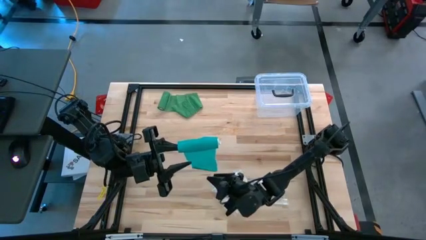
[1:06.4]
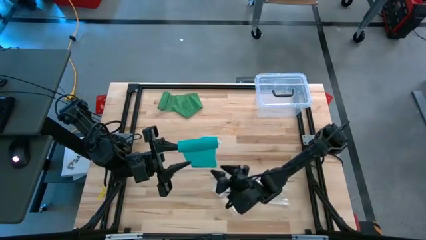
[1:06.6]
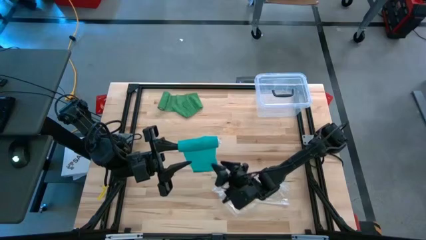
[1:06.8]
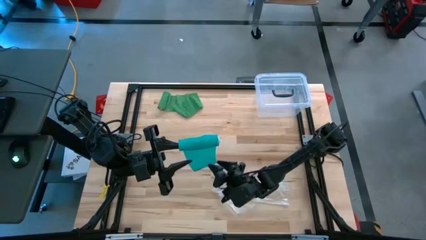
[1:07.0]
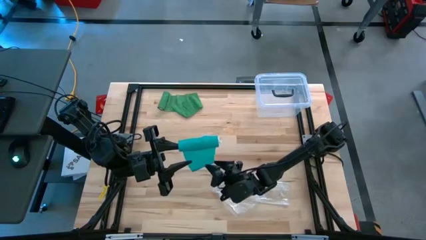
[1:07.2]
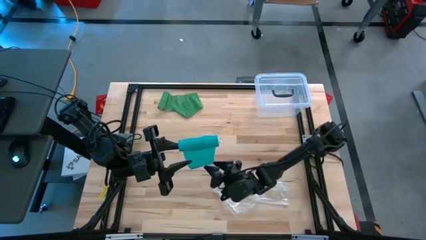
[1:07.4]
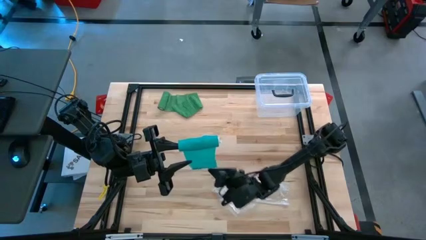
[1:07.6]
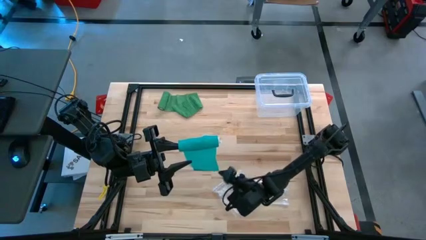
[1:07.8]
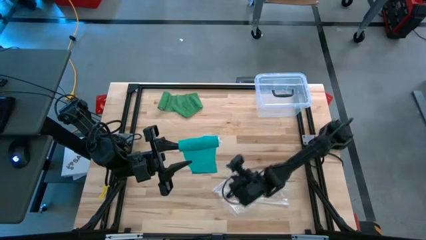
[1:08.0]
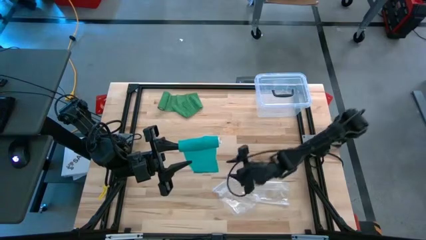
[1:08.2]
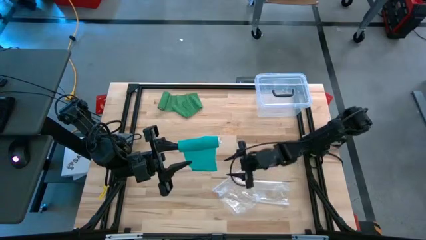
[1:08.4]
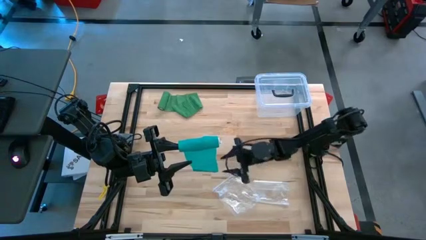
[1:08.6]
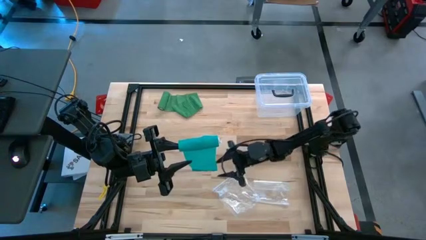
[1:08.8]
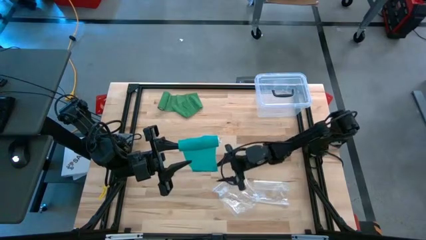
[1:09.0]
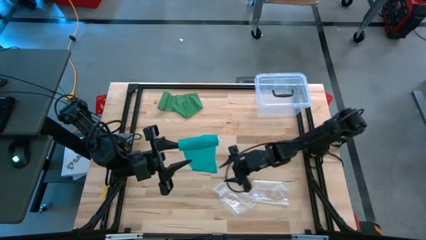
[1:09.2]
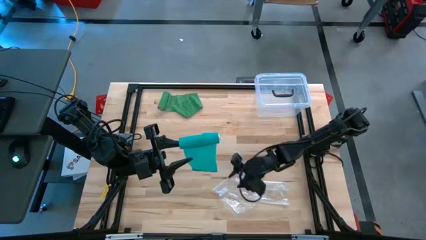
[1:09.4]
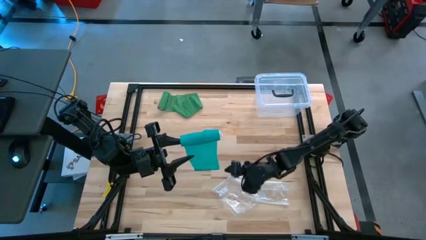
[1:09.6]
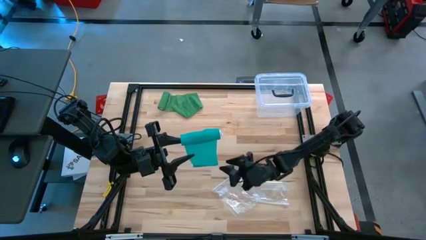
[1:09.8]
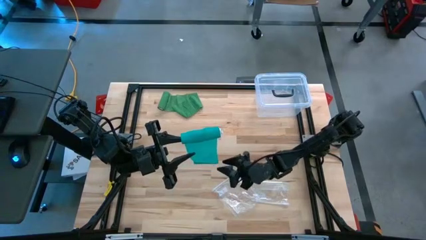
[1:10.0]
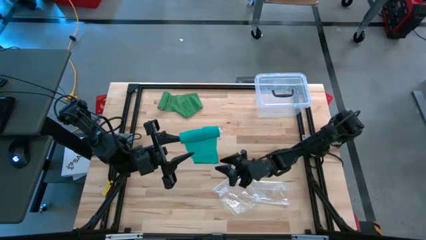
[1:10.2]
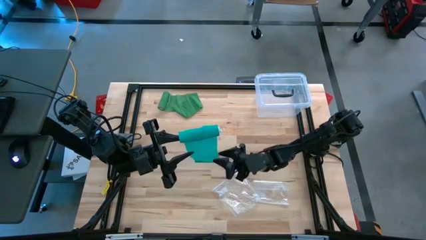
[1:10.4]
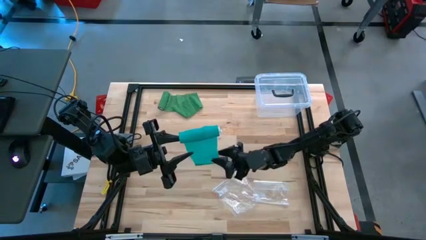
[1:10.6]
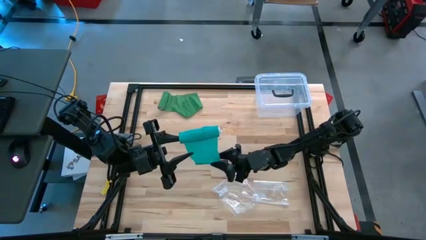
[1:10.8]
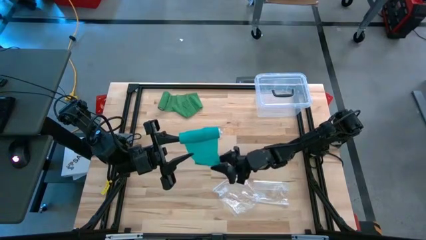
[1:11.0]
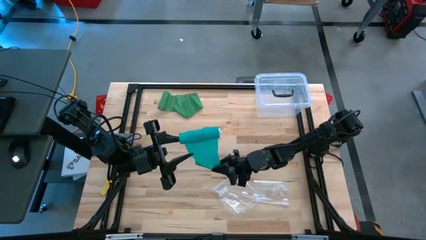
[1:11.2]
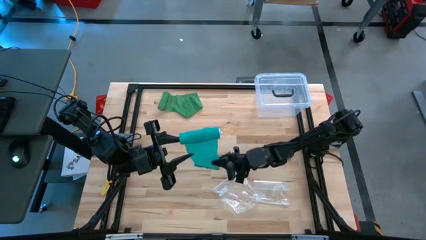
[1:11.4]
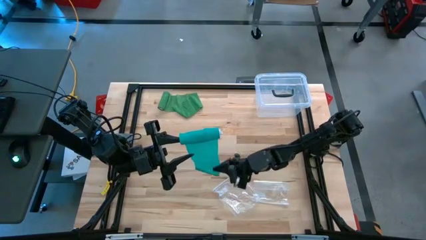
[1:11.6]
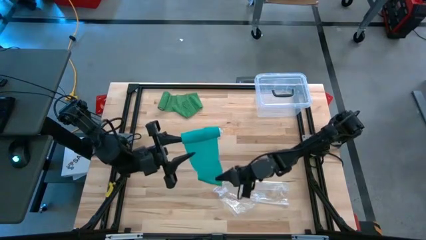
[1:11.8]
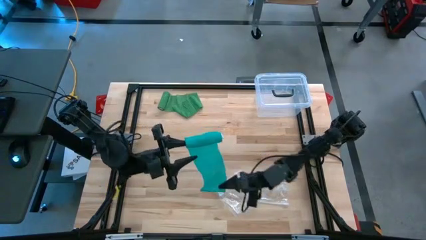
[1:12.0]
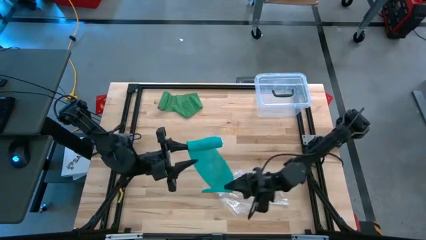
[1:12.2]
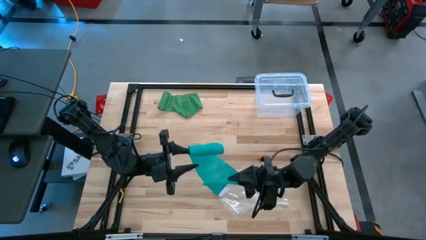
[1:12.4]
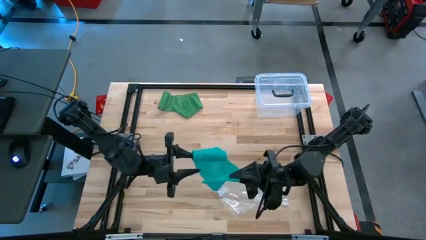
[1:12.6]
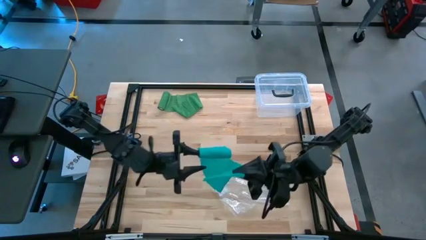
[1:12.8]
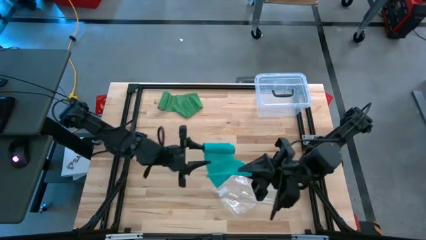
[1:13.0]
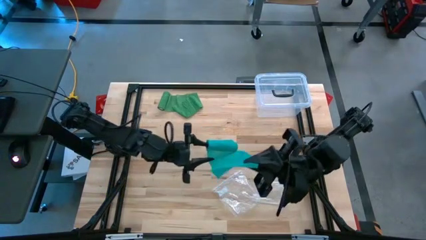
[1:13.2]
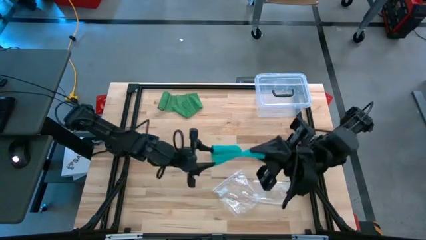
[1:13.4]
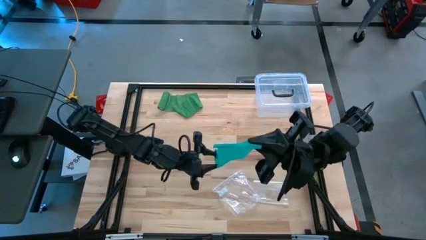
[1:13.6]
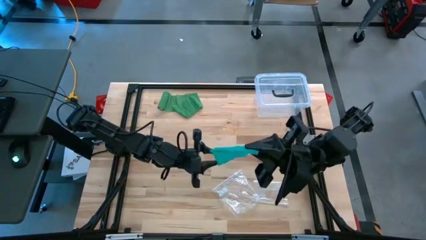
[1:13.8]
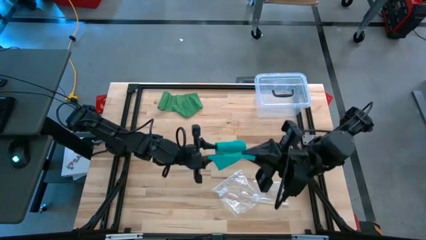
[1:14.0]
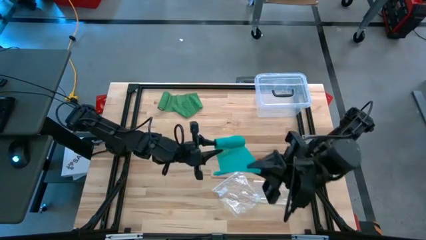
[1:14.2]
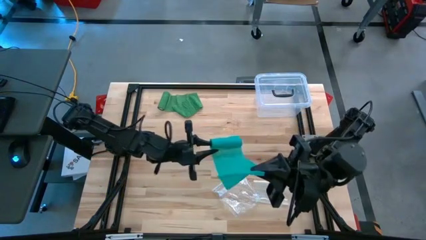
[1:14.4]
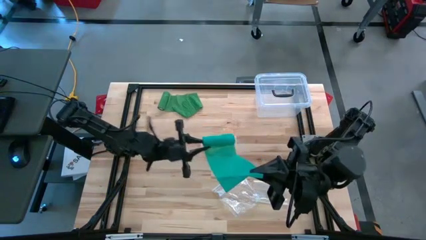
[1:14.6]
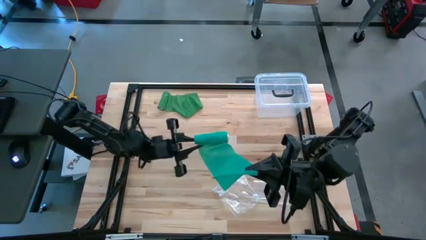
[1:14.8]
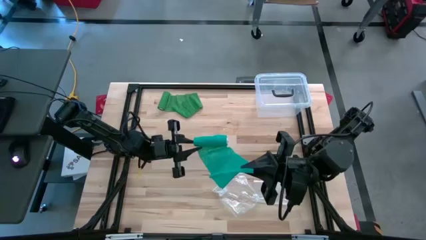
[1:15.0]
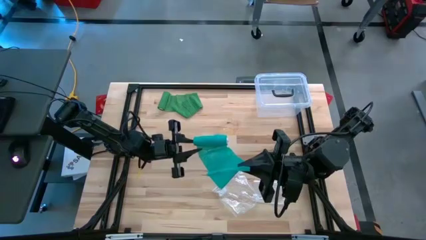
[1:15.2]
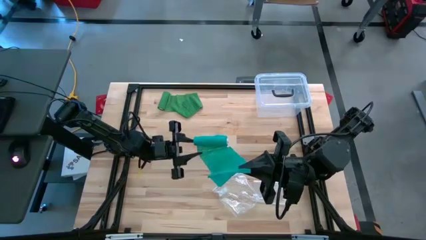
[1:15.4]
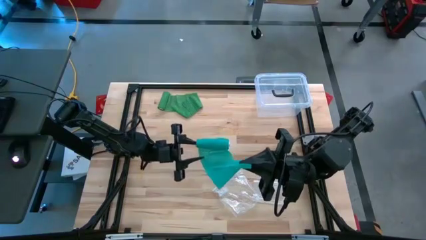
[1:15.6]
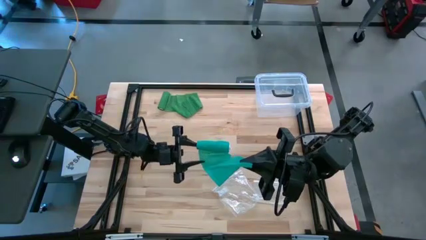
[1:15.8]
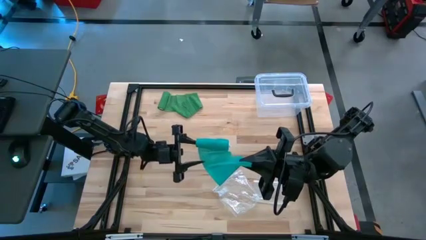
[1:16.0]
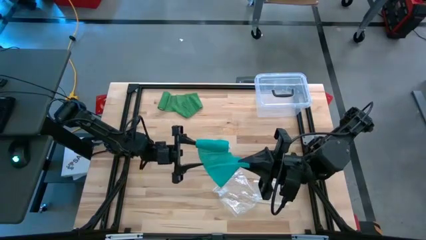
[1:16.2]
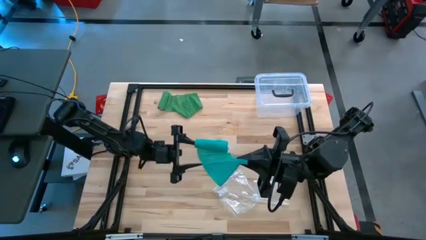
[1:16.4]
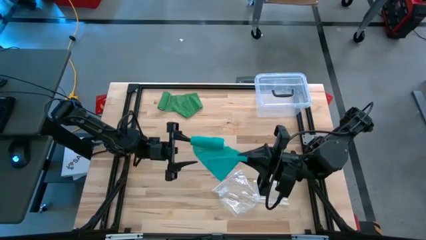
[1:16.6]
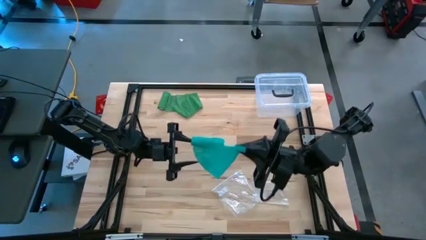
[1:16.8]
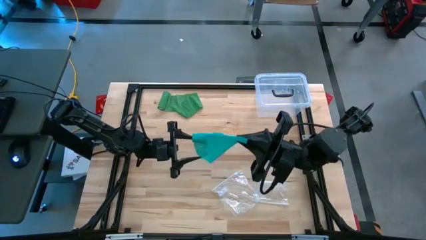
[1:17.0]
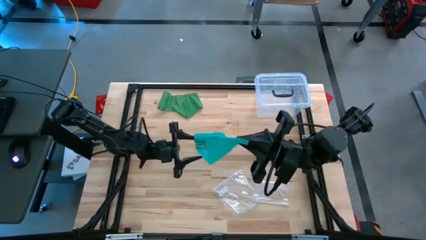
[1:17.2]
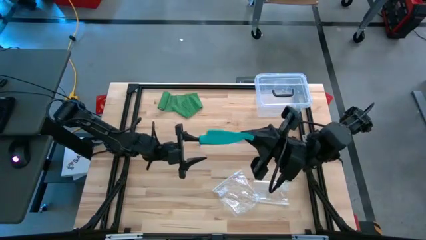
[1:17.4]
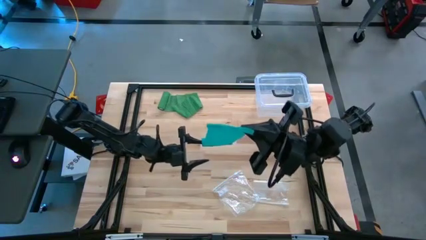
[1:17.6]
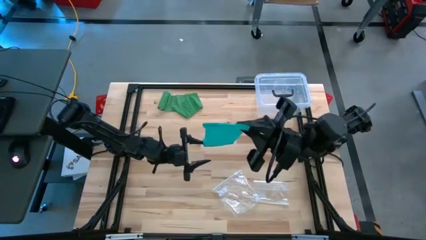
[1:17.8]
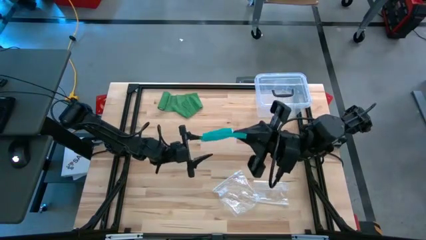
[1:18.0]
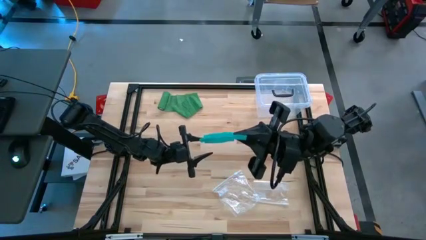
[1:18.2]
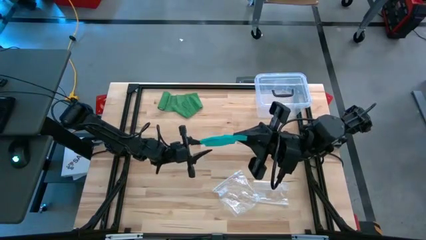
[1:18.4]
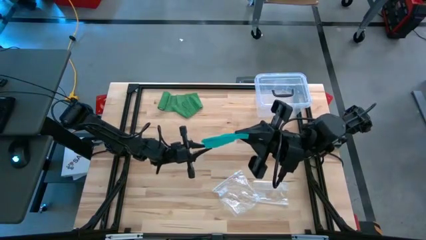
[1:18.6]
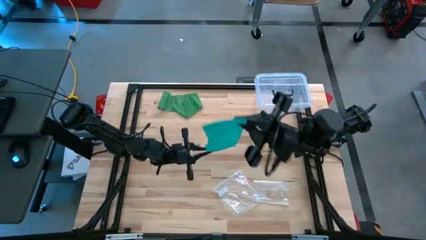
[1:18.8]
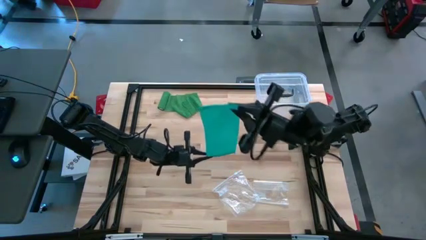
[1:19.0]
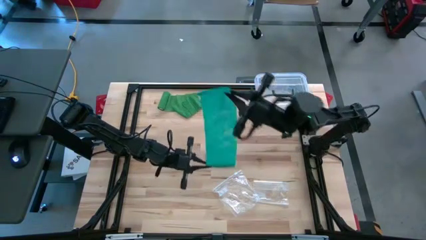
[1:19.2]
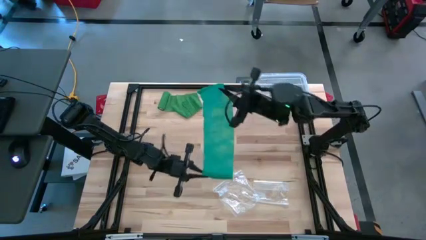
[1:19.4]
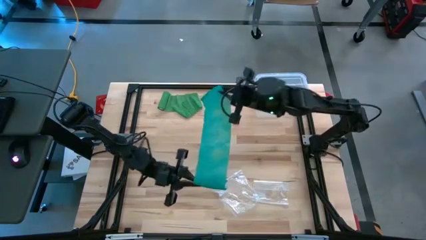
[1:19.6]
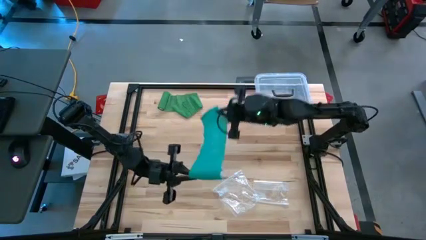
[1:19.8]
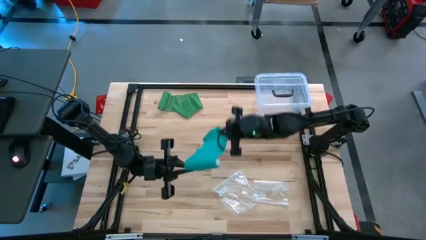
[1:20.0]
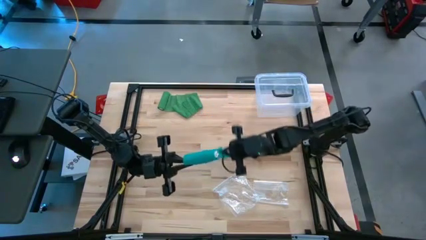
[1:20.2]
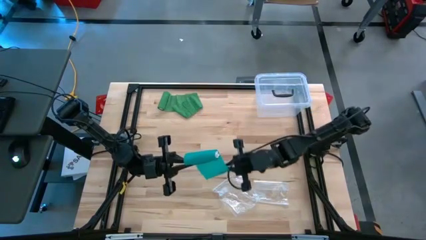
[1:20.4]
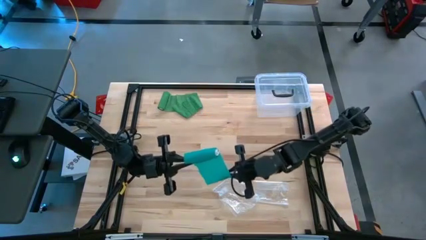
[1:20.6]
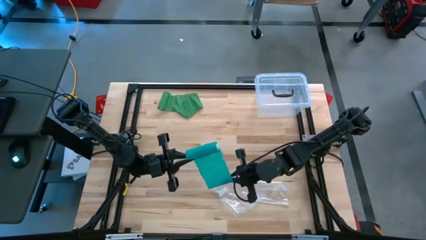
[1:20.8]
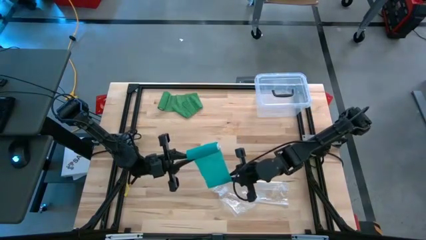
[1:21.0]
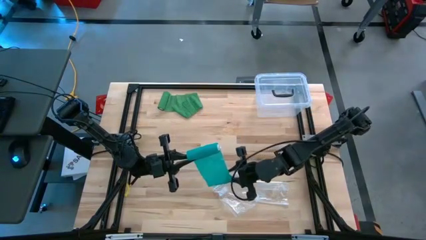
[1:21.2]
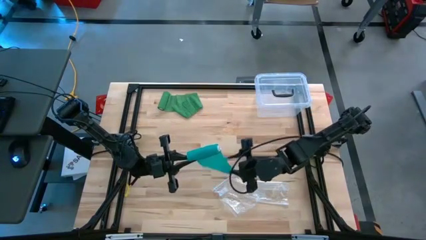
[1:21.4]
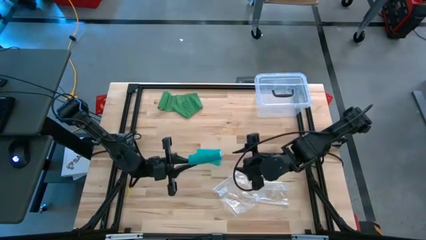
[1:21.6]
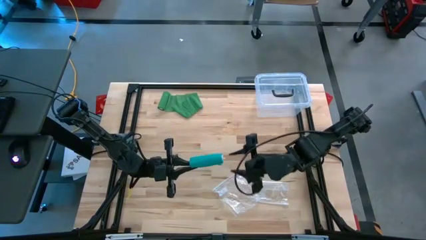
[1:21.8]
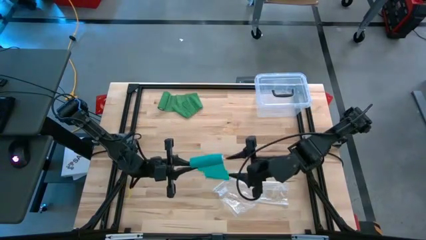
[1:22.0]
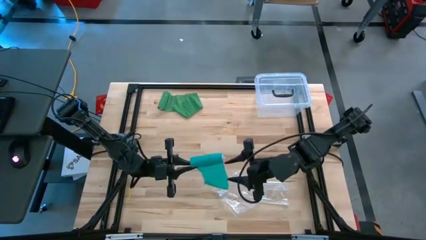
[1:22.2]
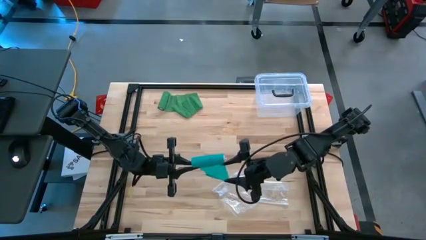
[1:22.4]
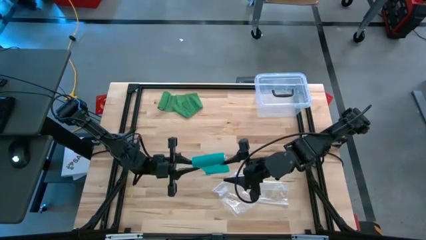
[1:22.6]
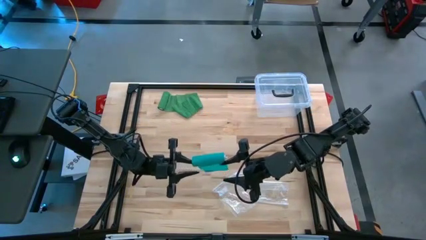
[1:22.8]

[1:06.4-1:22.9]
Task: Roll bandage
Roll the blue bandage
